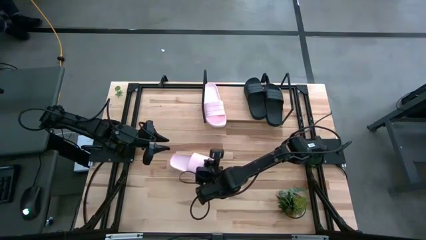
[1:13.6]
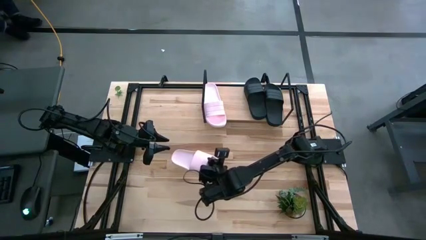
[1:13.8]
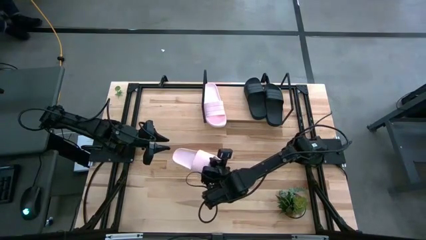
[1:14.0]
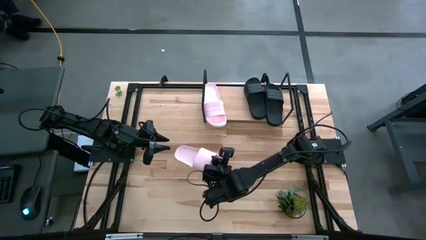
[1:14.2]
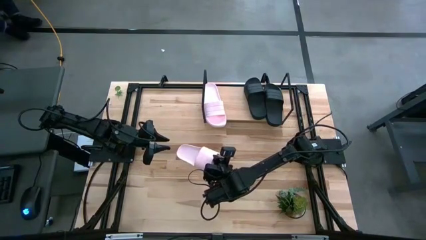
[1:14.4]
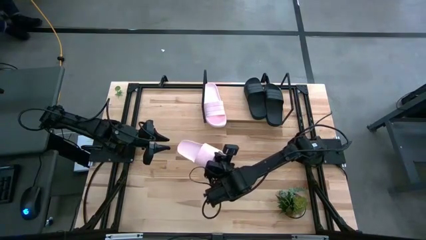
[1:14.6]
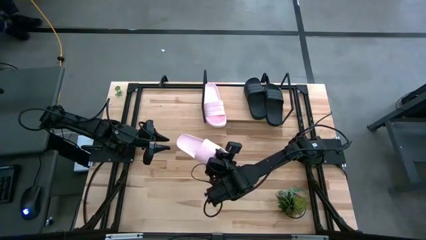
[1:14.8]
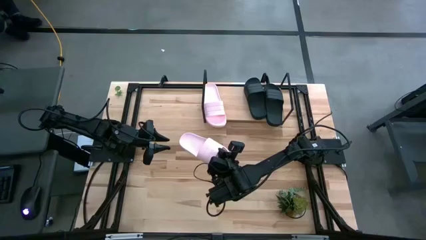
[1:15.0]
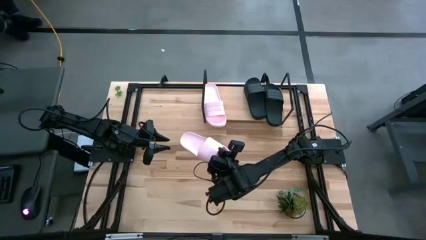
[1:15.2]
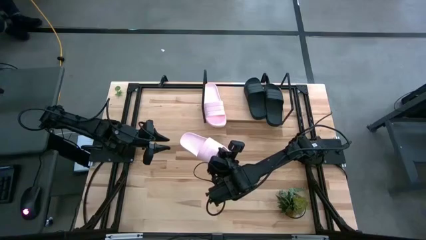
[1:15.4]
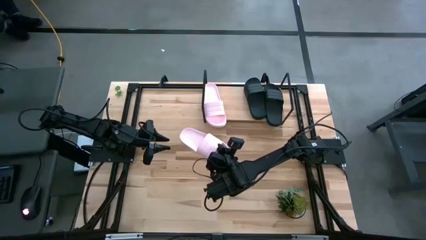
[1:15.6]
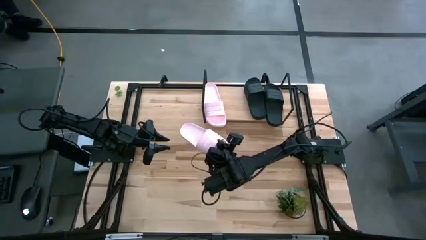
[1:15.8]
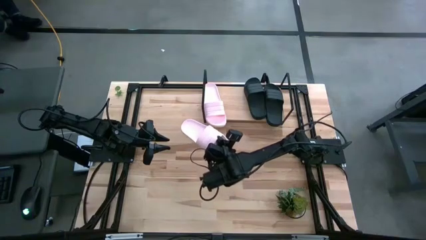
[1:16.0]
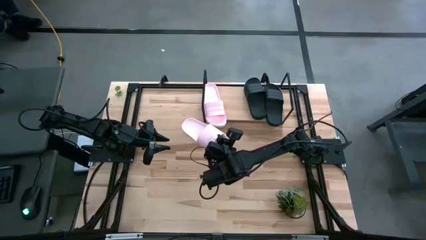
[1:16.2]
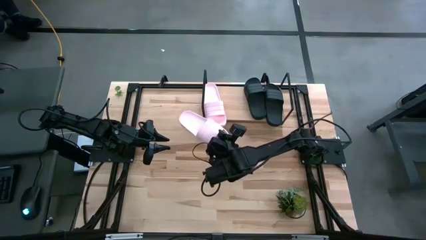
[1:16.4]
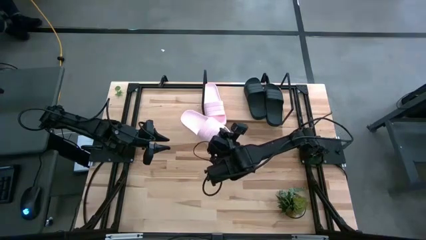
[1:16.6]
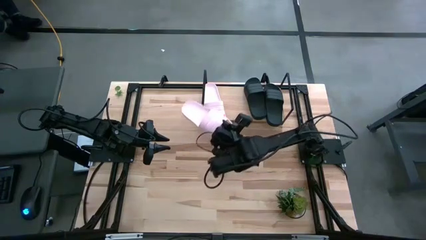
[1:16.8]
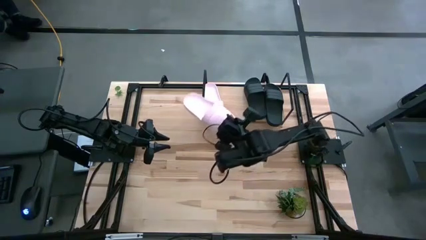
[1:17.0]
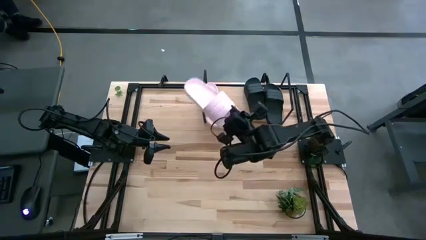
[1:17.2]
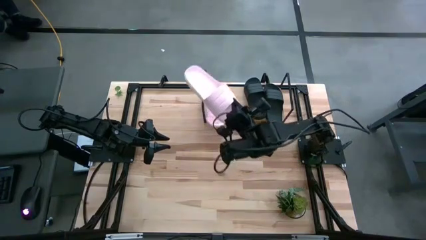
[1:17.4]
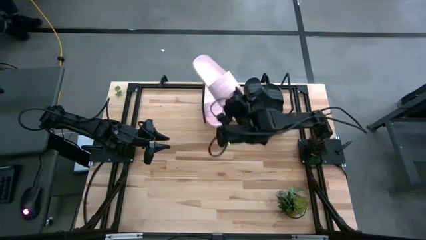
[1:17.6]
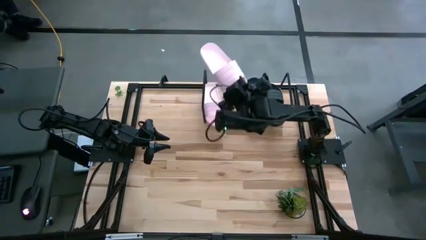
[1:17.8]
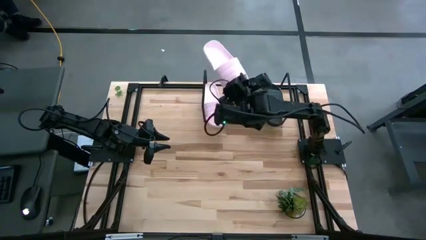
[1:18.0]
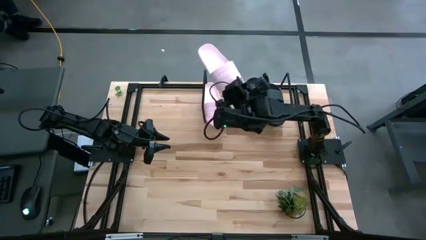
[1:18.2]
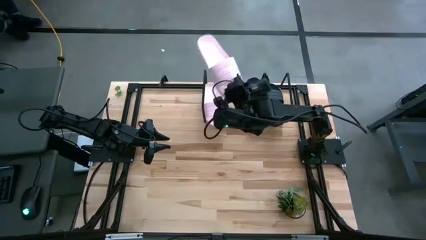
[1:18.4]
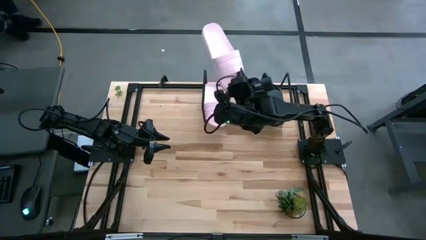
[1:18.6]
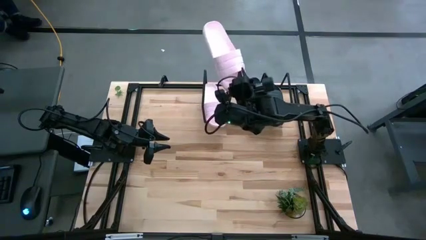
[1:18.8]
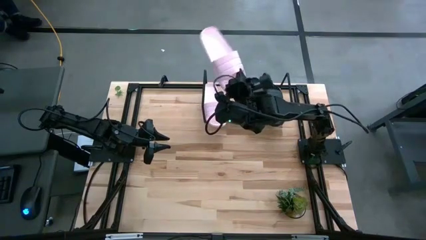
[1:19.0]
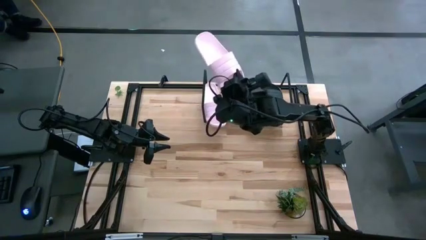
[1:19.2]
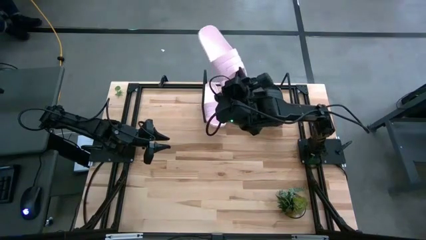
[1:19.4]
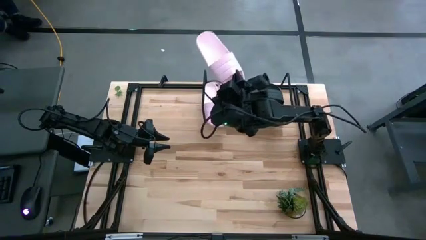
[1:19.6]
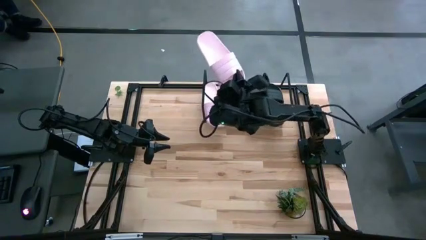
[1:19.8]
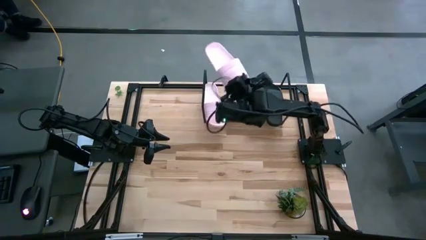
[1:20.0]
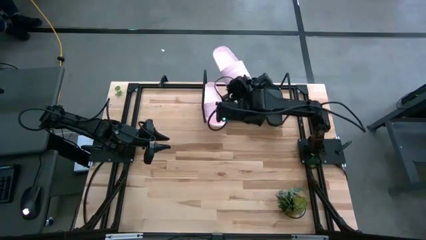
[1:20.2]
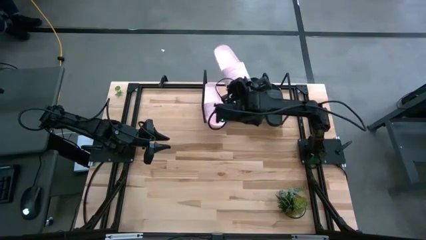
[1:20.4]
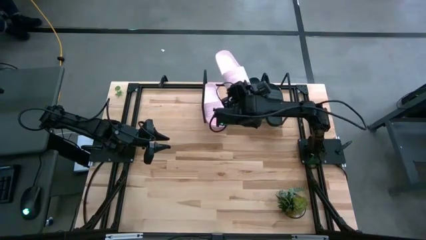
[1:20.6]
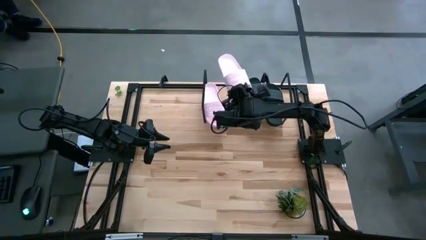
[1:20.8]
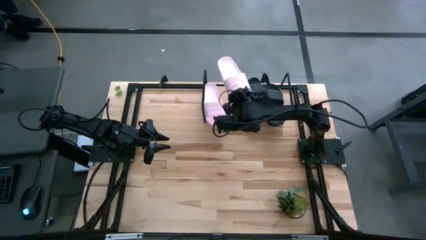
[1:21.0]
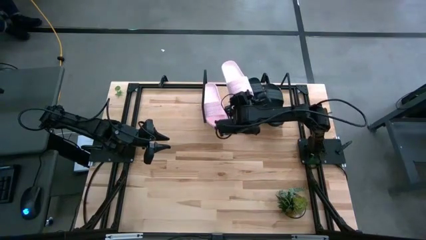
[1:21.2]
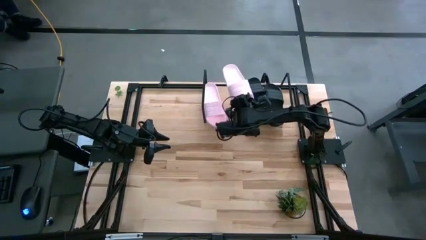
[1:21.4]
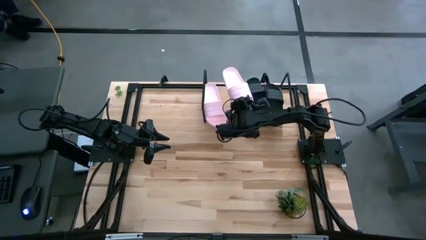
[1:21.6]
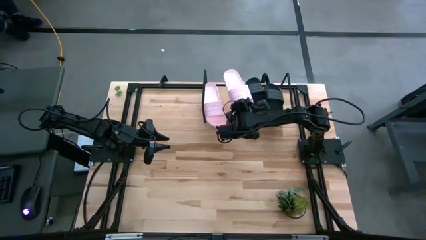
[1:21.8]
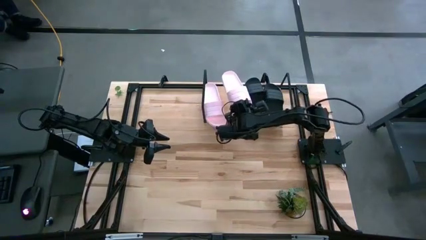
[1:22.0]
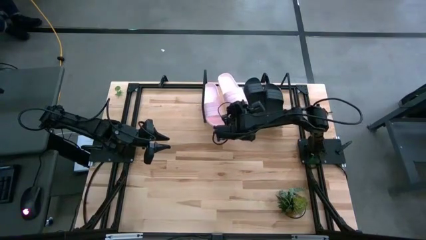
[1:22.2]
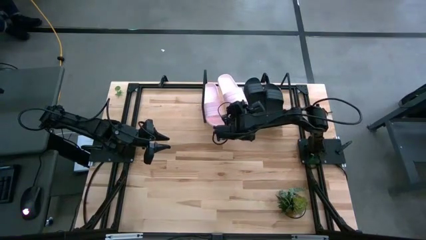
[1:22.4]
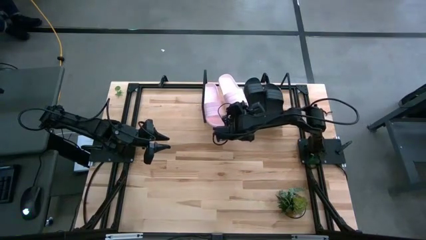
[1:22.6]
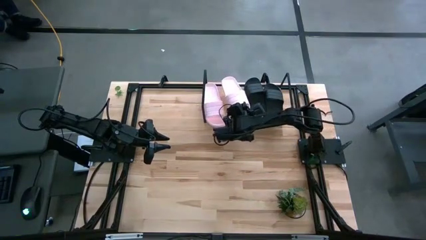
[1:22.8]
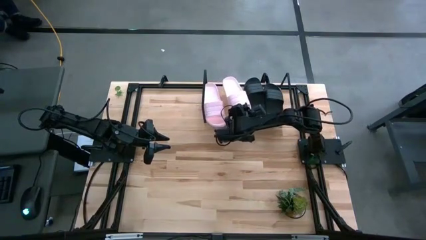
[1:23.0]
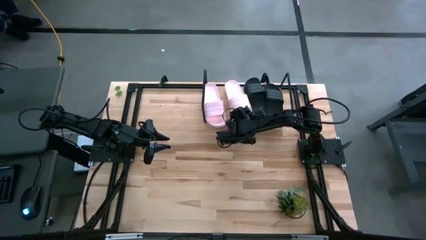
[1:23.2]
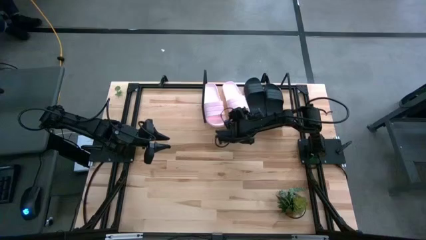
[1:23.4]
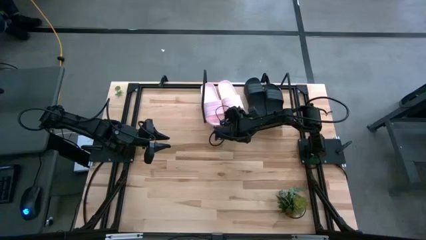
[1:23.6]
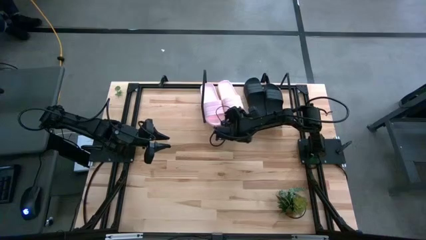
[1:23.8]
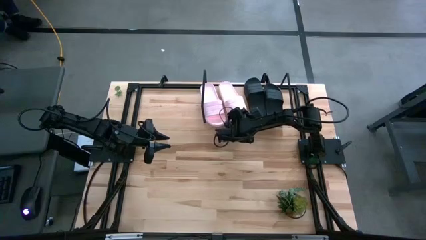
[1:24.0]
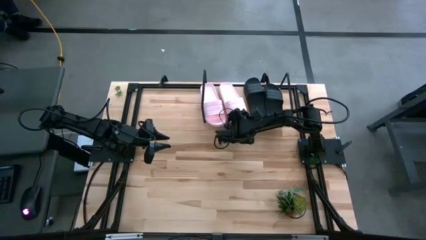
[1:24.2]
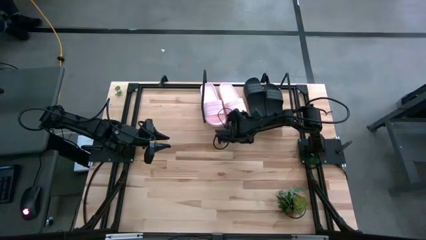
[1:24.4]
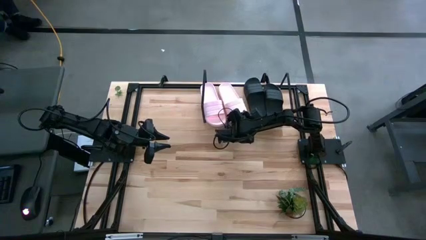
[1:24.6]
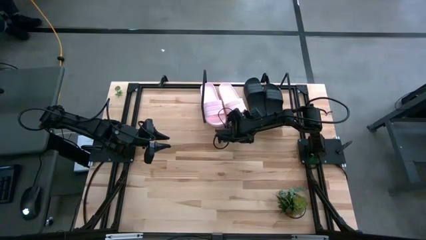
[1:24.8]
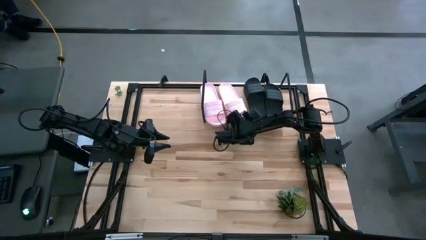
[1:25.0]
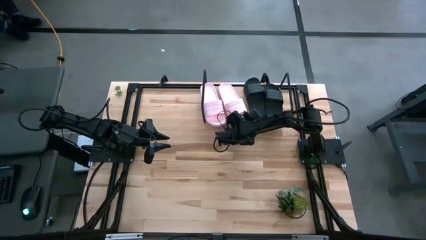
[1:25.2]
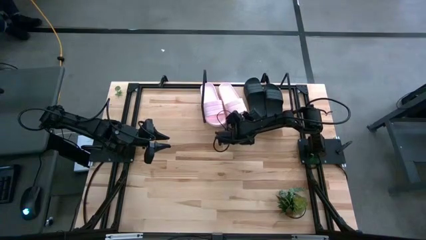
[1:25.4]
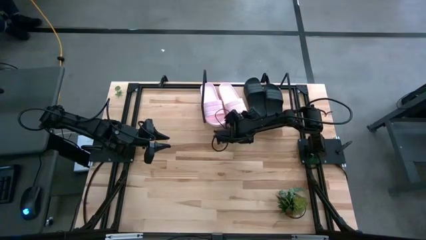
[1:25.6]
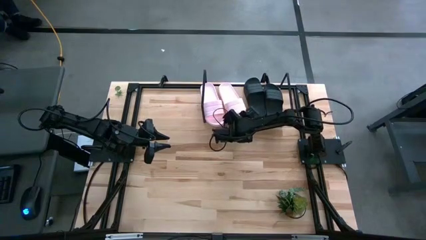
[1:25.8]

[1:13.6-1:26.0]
Task: Pick and place slides into the shelf
Put the pink slides on the shelf

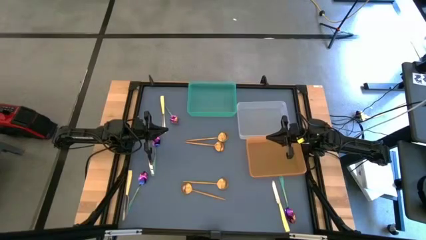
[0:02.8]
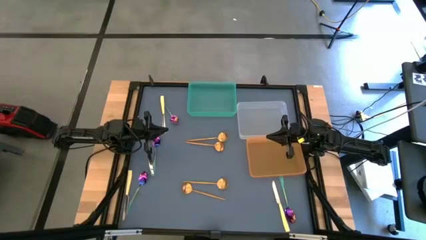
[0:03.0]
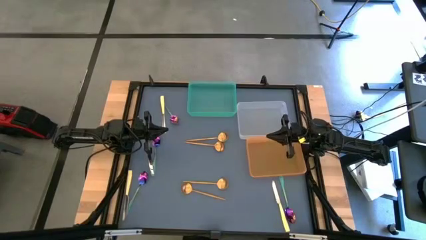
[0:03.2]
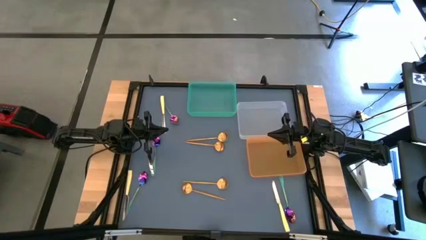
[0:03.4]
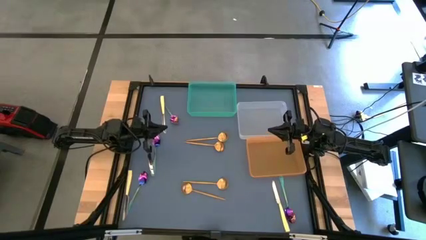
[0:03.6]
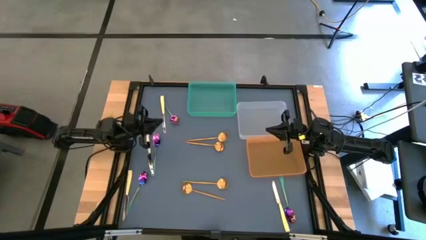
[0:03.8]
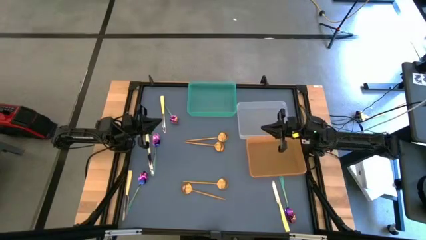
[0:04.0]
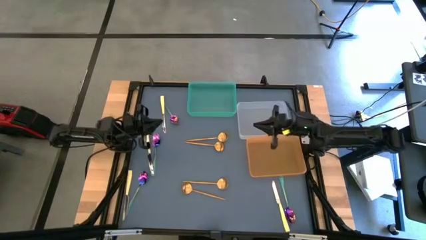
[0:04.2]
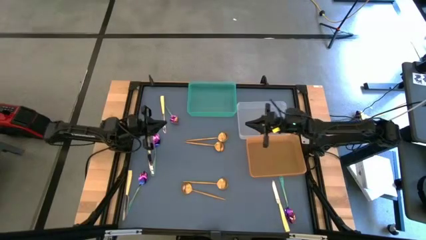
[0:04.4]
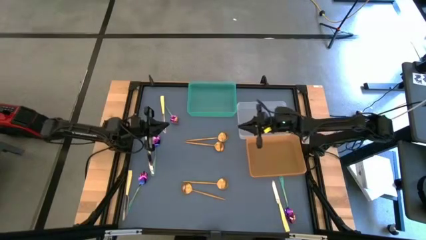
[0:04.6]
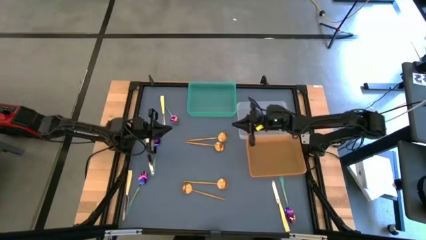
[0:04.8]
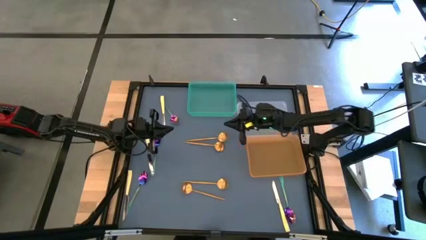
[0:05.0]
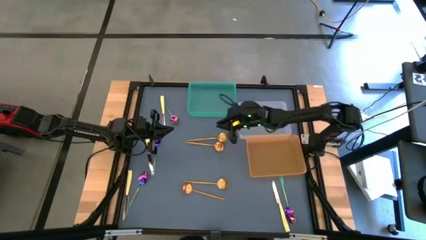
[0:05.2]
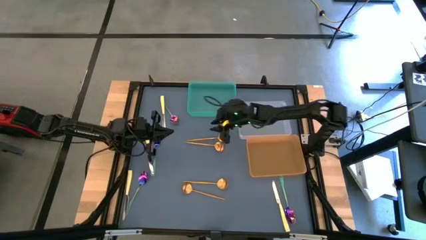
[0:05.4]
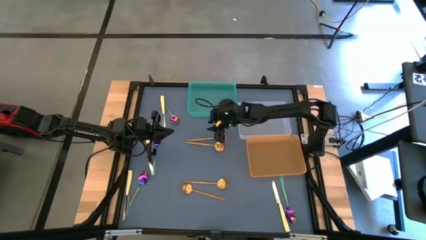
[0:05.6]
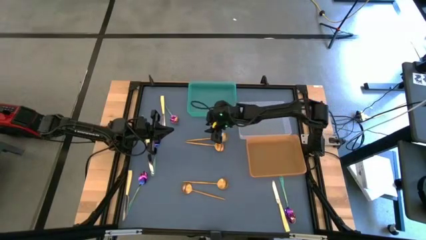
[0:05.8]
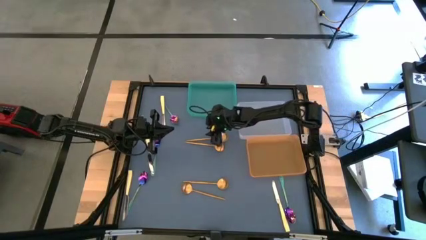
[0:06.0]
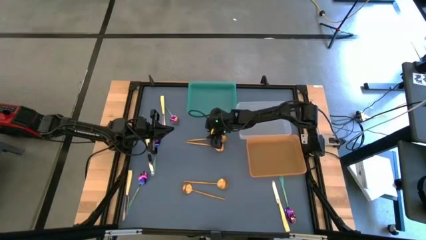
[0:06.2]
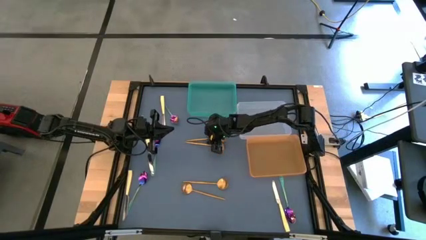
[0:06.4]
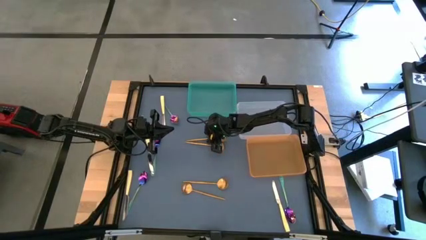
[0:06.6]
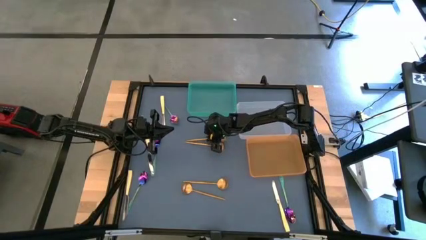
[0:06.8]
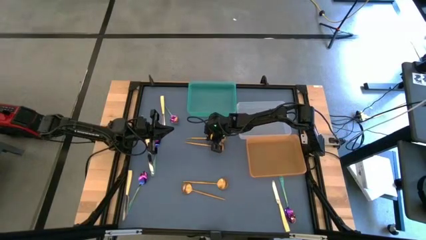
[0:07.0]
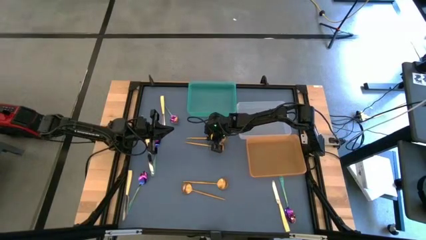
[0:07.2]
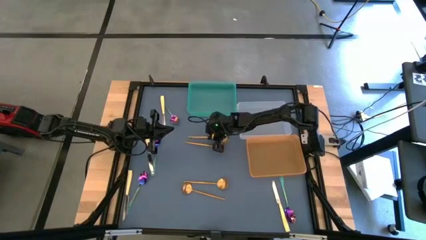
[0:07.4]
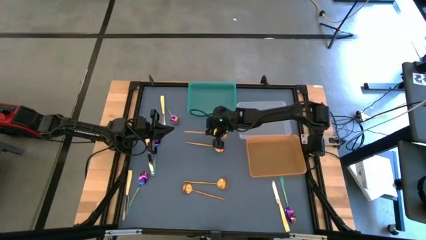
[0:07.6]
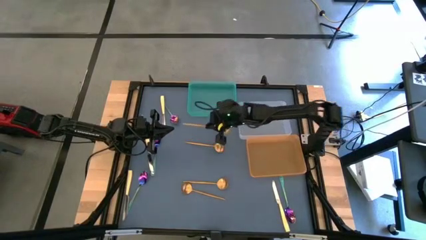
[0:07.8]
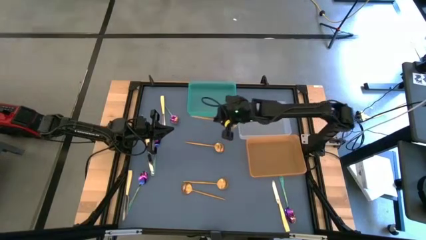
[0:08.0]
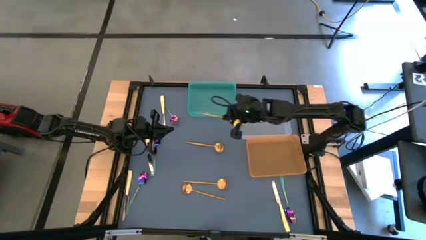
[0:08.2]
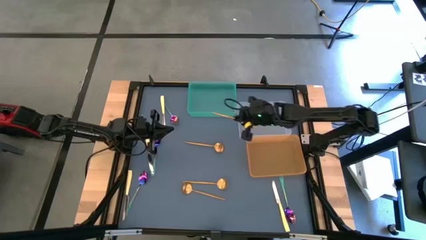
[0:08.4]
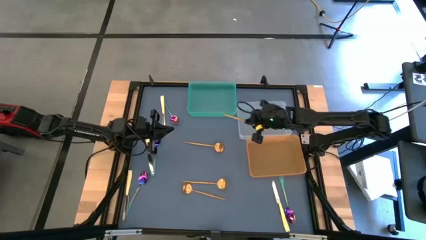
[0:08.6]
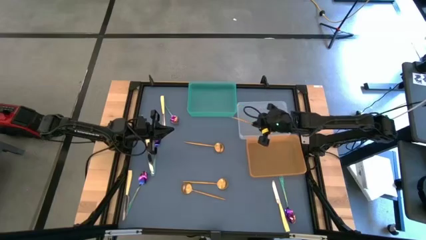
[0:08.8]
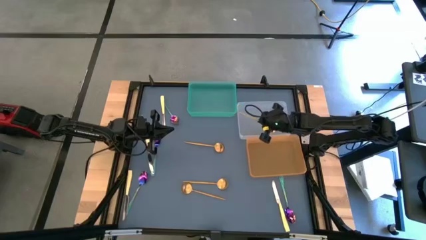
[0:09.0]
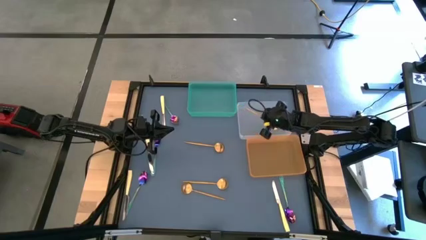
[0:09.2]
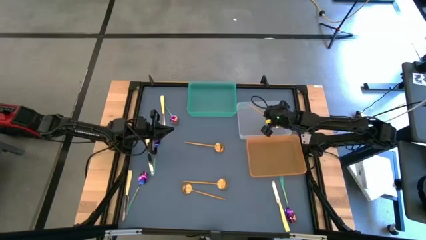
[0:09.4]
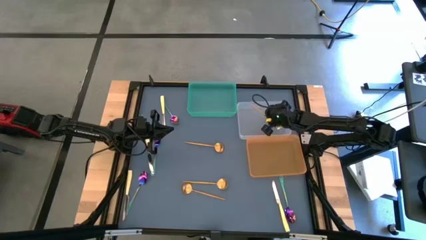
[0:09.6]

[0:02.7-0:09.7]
Task: Sort silverware by color (type)
Put the gold spoon into the transparent bin
